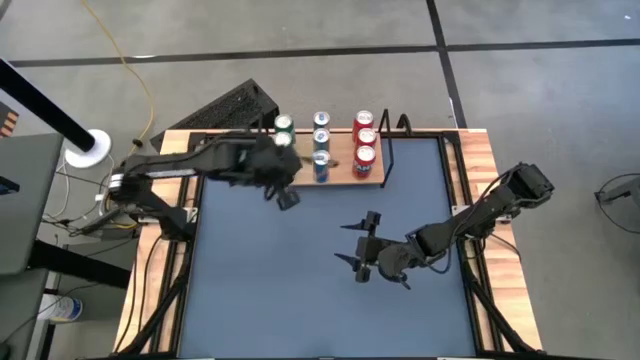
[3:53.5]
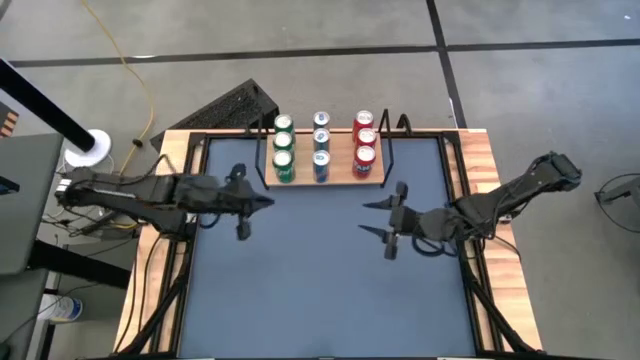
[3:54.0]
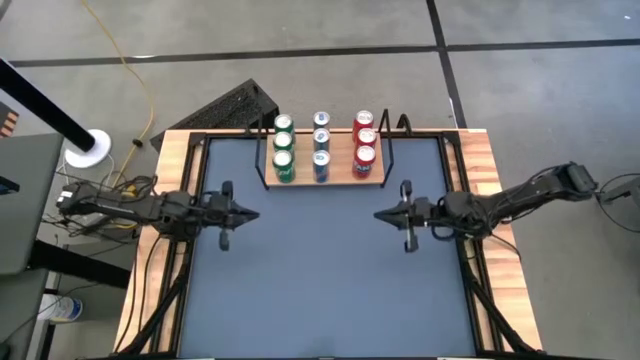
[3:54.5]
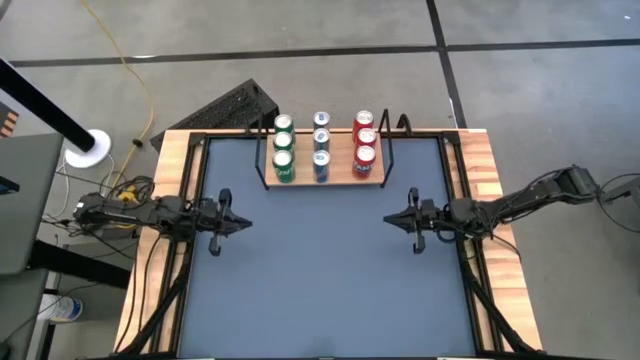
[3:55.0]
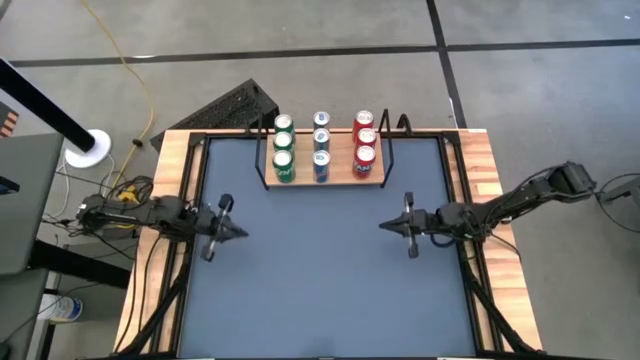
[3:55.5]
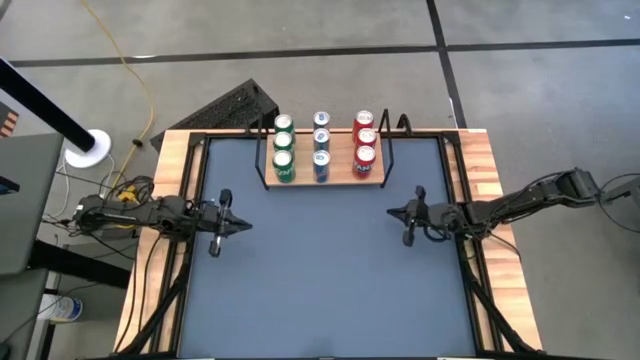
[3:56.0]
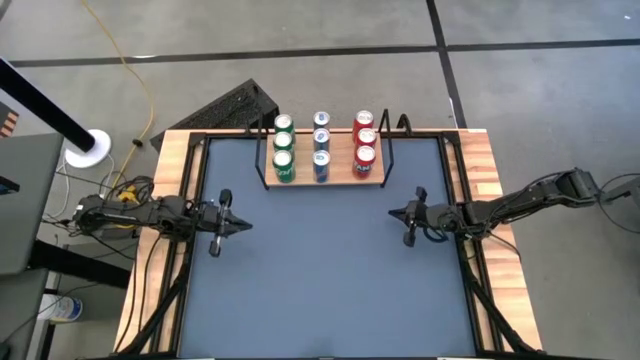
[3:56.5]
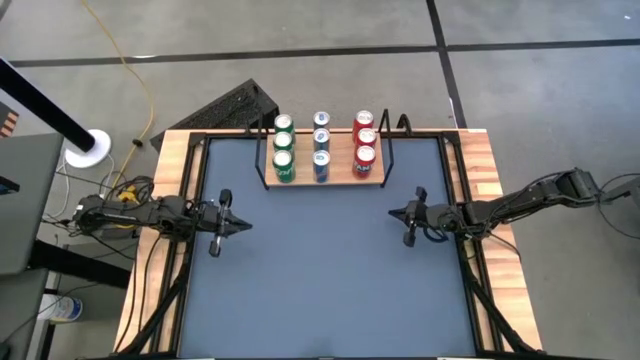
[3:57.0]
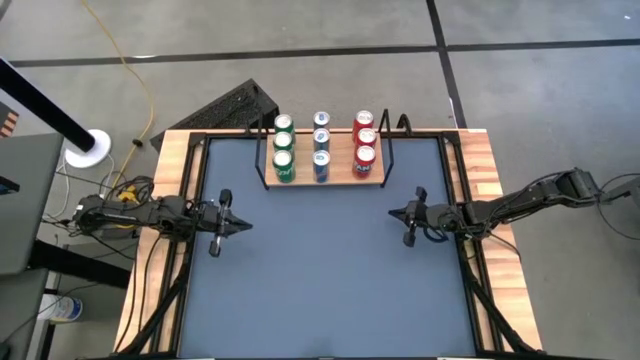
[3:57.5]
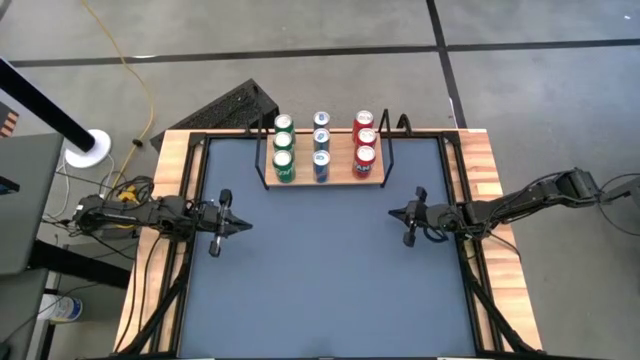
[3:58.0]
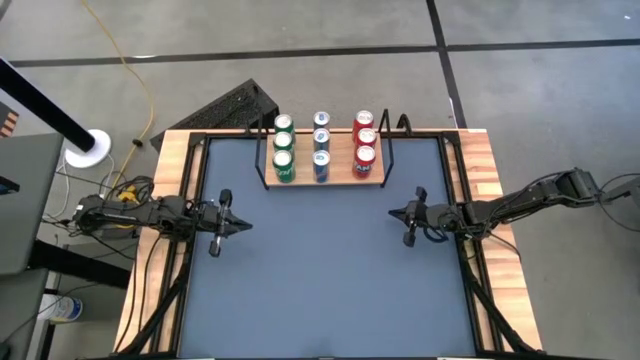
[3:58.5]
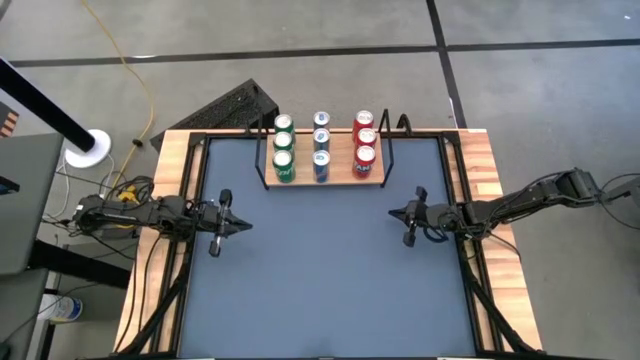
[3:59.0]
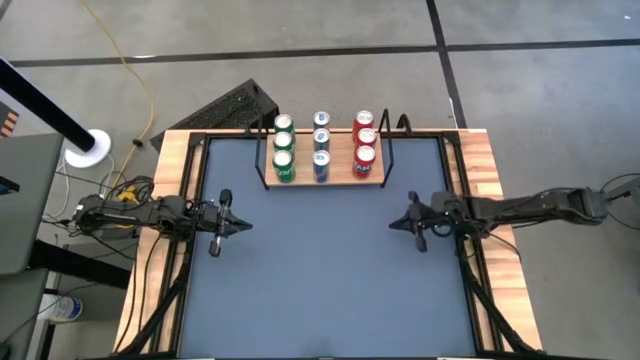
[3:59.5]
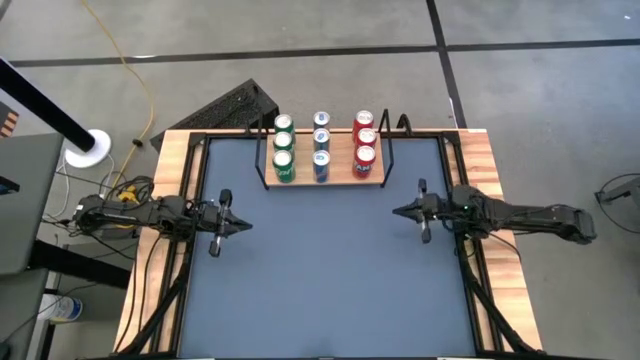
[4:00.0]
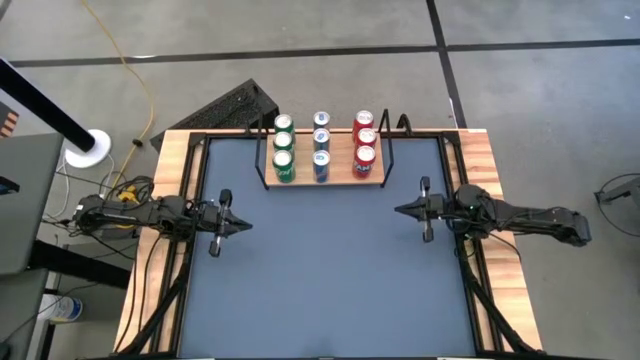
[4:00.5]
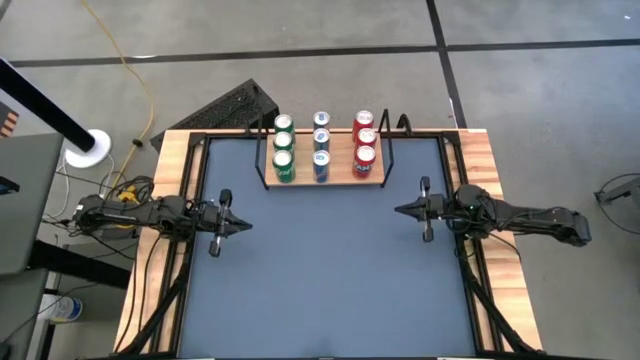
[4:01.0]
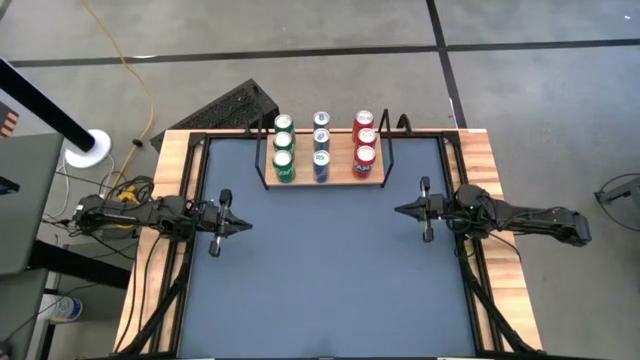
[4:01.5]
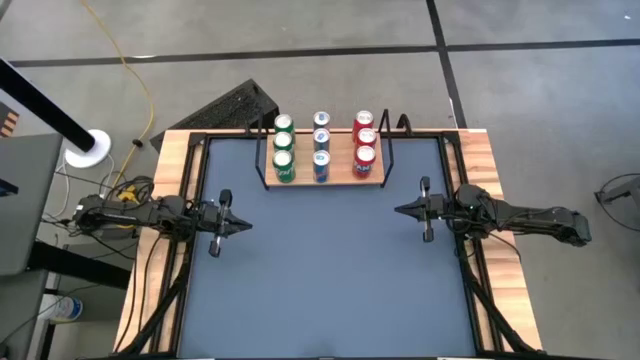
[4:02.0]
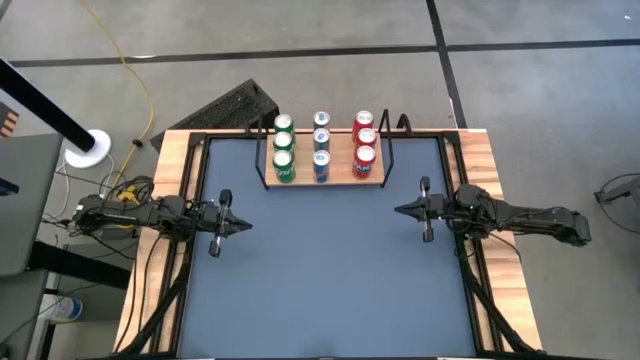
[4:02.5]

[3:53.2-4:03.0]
Task: Place canned beverage on shelf
Return to Home Position

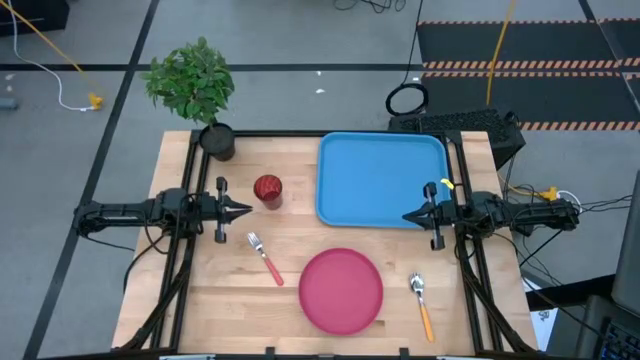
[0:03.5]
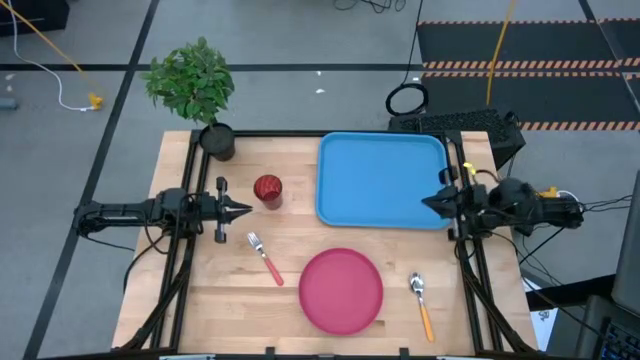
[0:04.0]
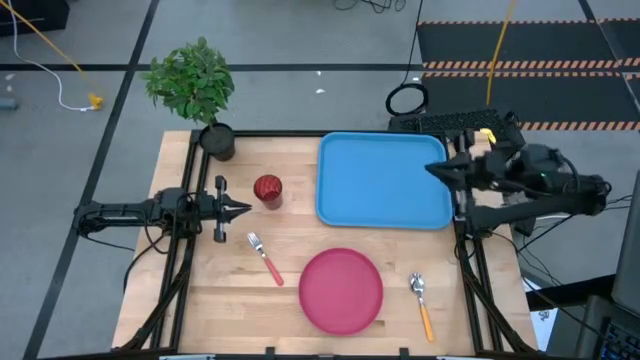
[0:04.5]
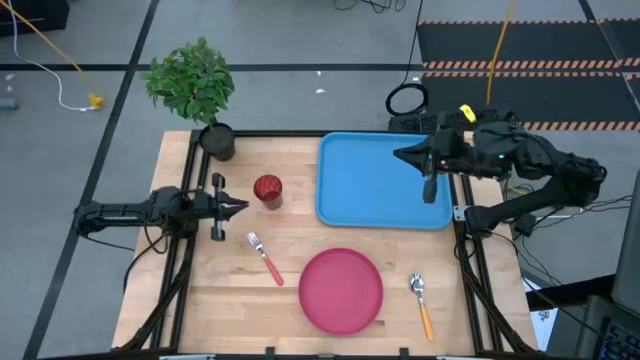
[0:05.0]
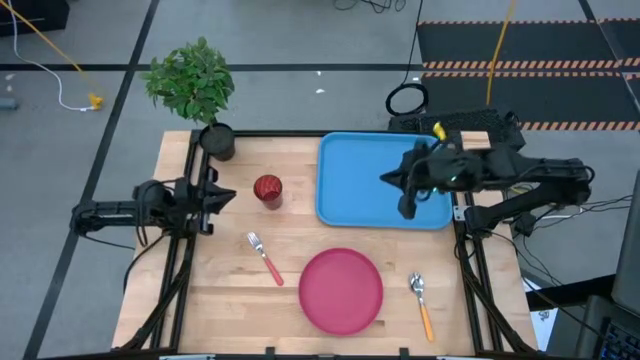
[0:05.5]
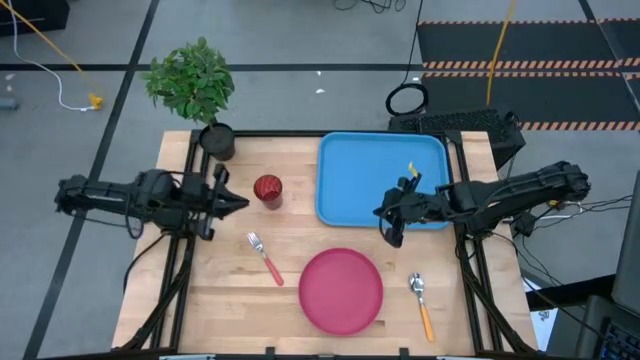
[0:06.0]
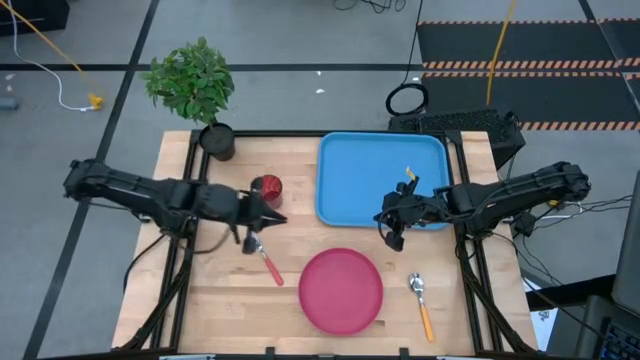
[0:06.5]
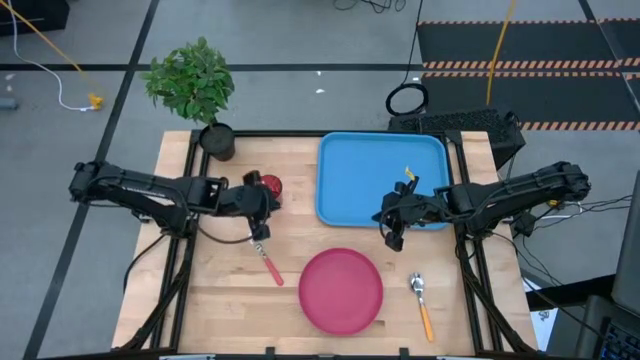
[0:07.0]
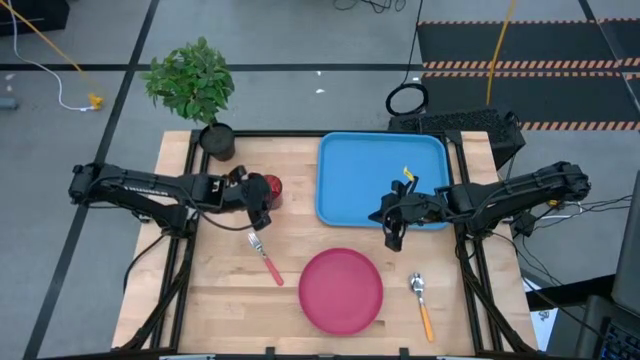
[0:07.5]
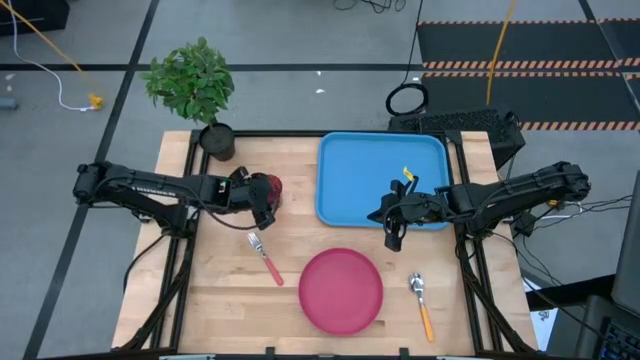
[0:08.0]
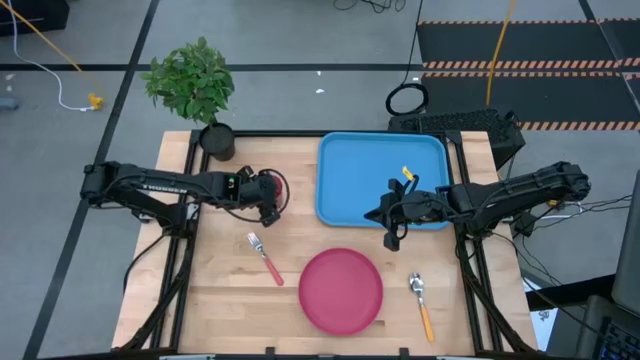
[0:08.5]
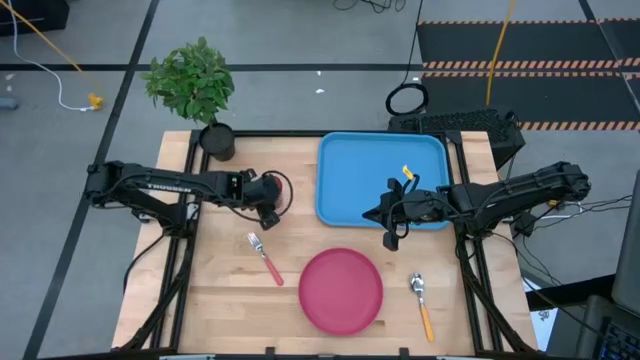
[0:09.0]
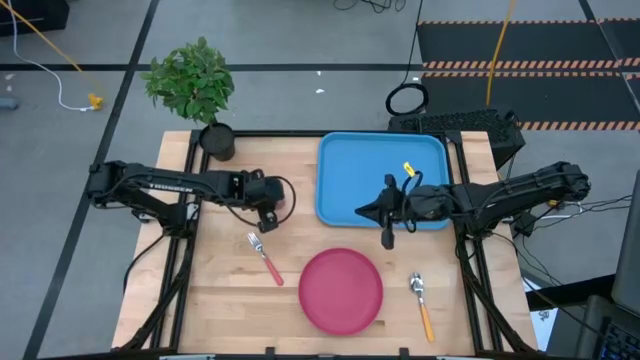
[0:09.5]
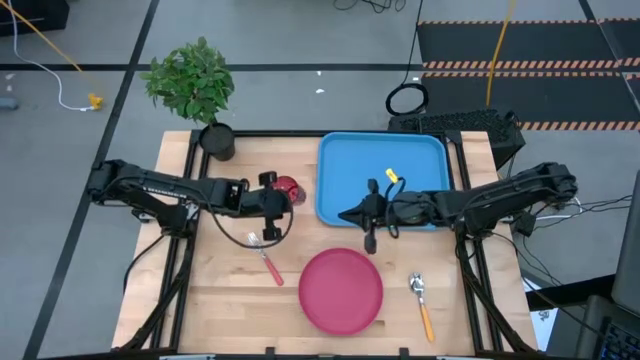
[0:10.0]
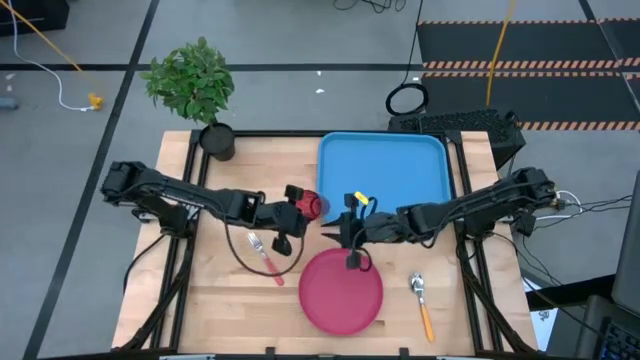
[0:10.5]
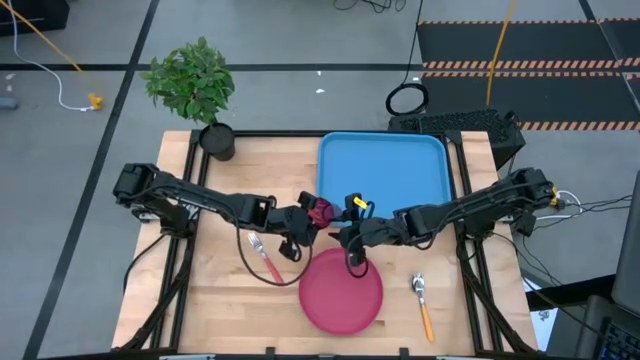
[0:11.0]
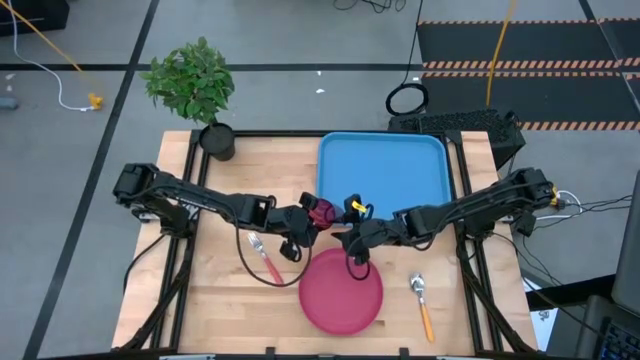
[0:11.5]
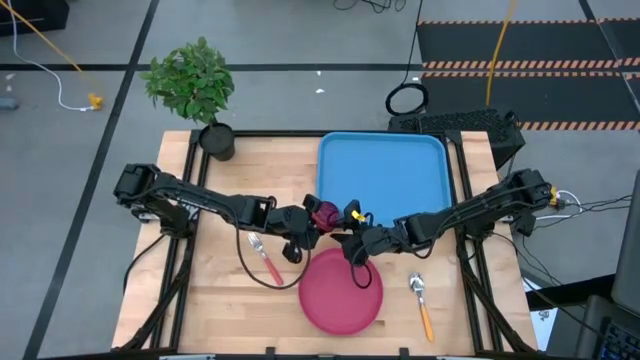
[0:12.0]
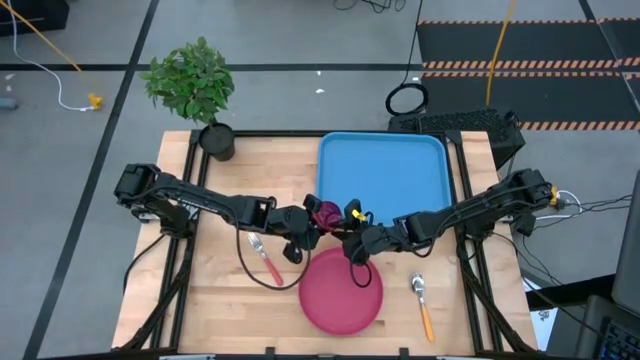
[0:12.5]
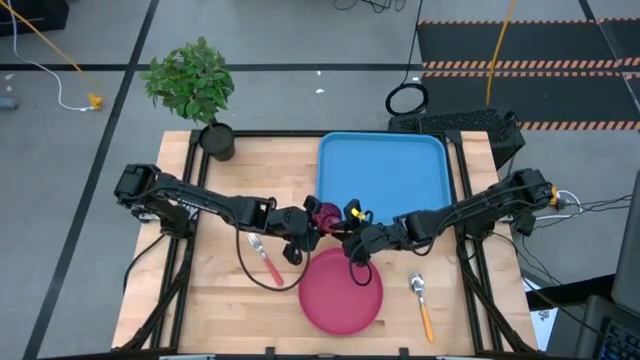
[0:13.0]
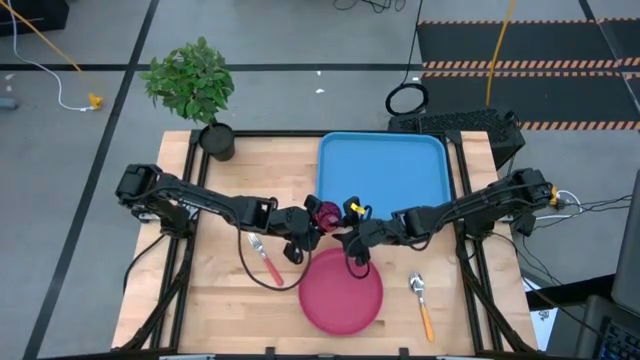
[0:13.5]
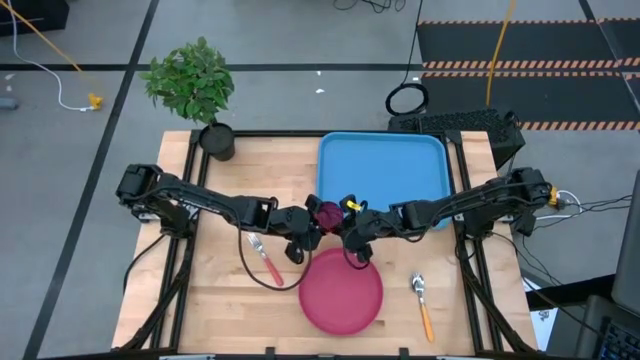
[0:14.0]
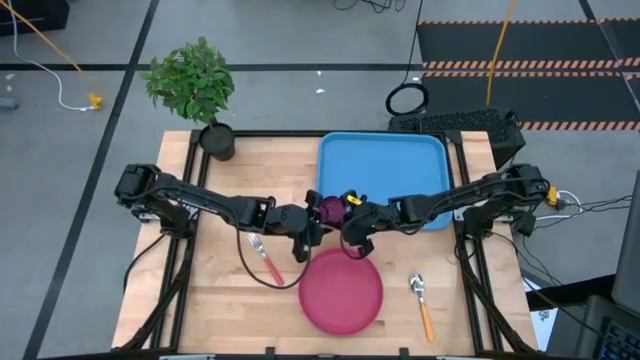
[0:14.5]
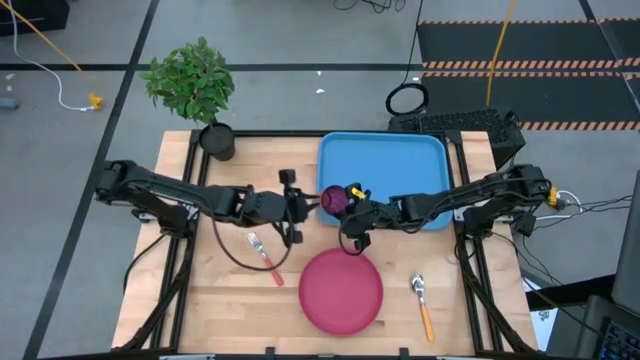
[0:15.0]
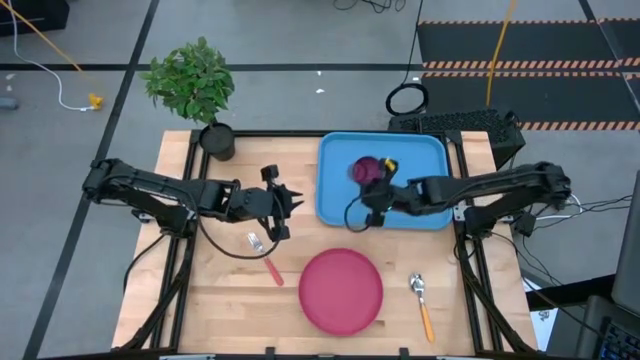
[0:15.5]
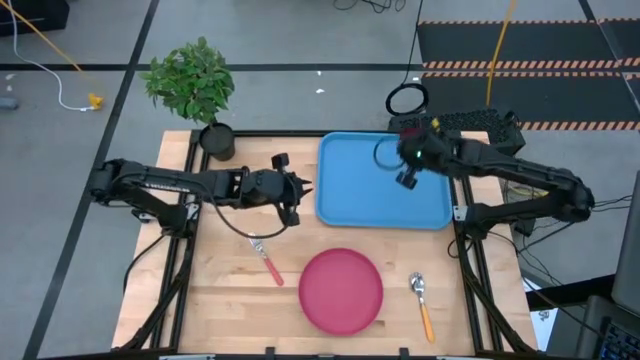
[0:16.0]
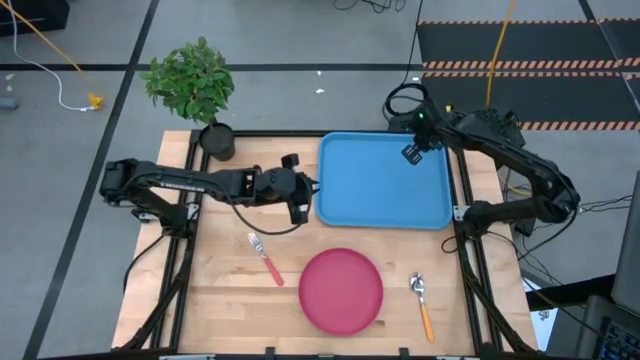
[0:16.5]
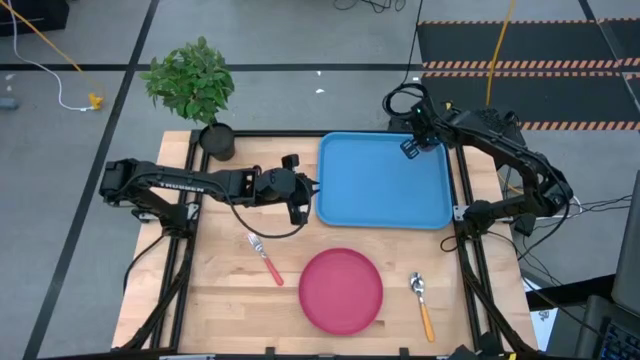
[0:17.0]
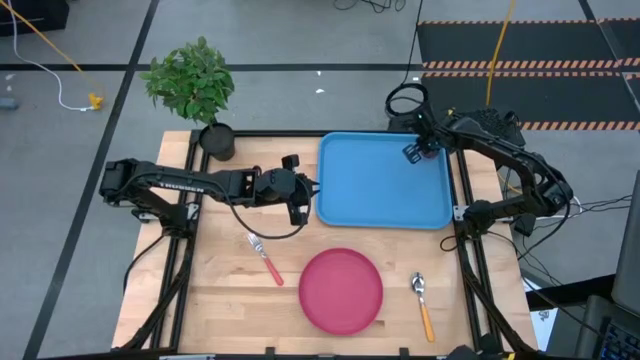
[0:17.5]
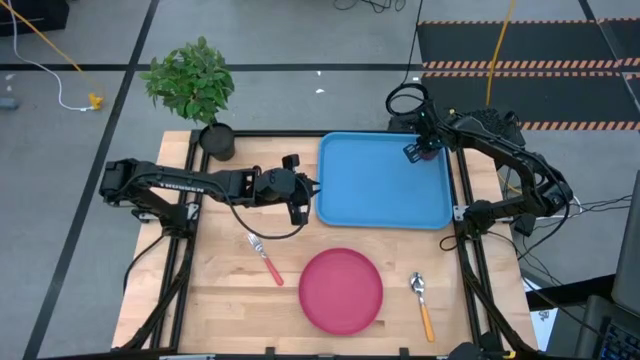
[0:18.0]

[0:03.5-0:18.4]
Task: Pick and place plate/cup/fork/spoon on tray
Put the red glass on the blue tray
